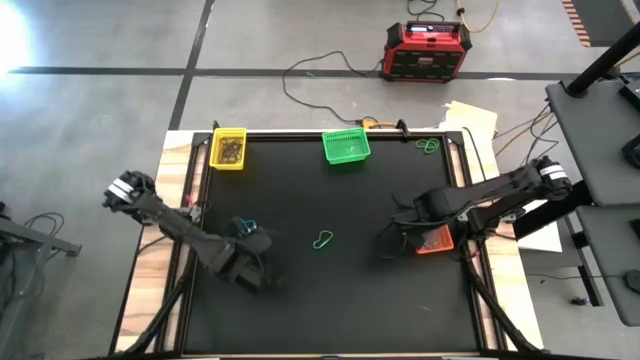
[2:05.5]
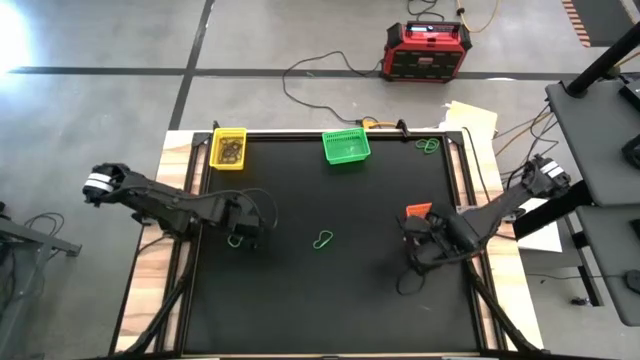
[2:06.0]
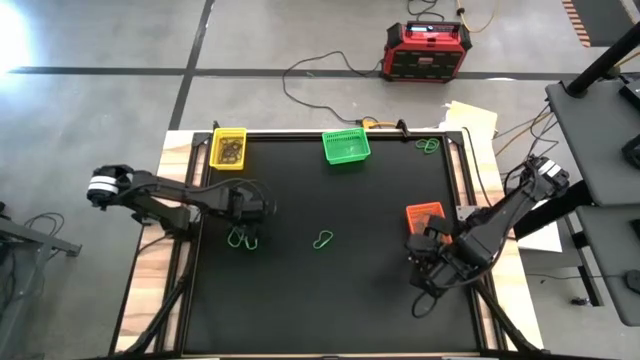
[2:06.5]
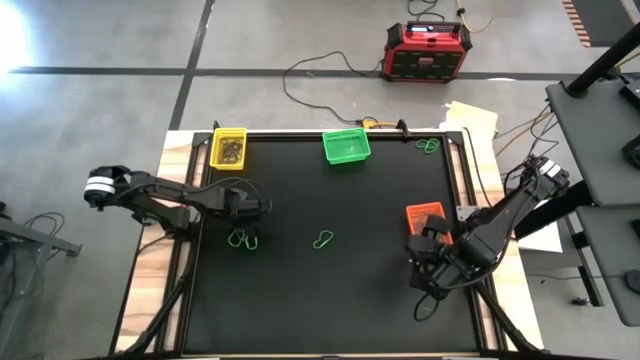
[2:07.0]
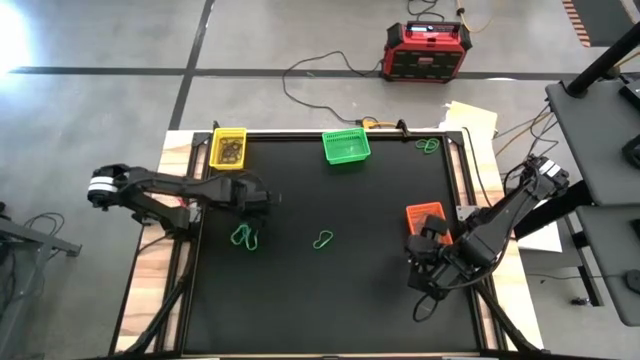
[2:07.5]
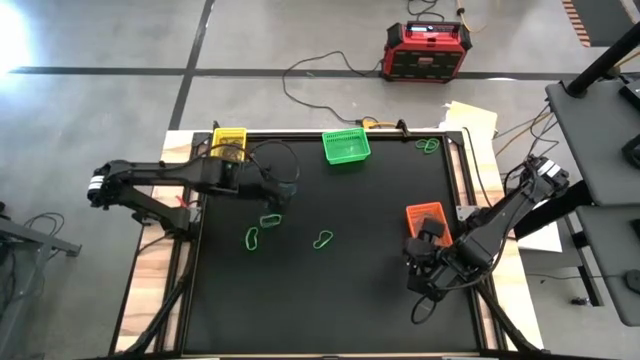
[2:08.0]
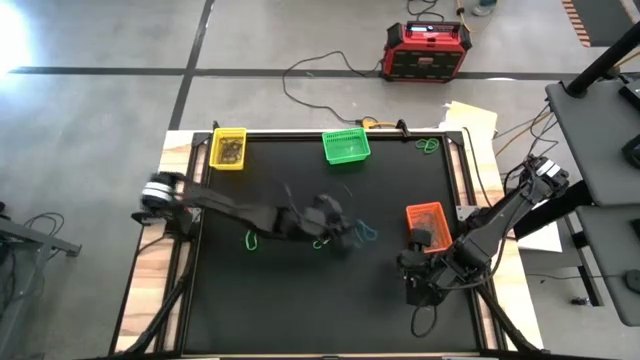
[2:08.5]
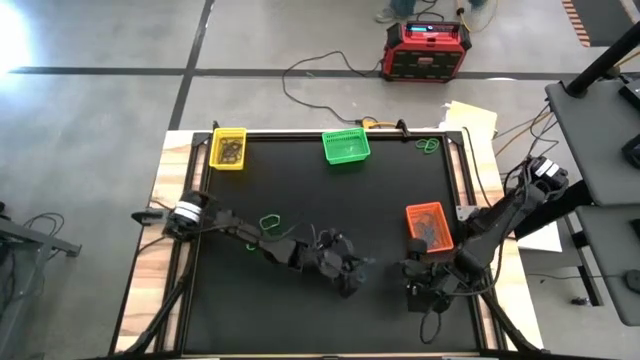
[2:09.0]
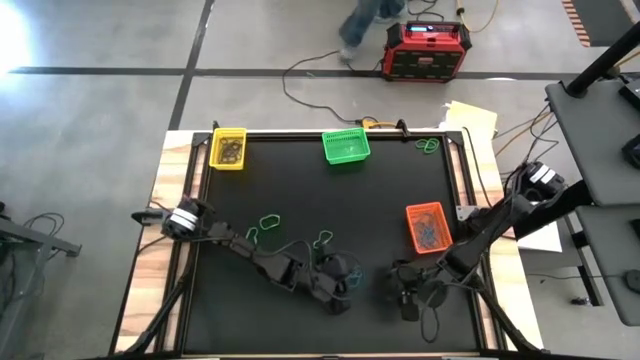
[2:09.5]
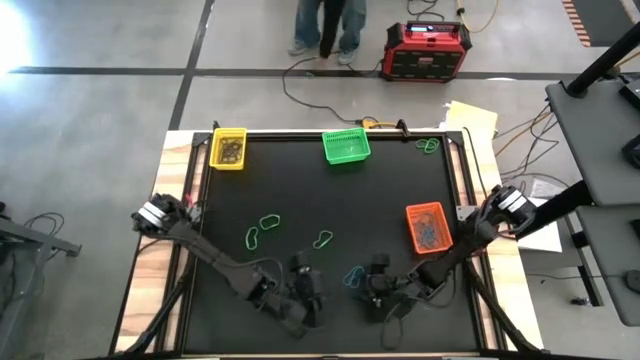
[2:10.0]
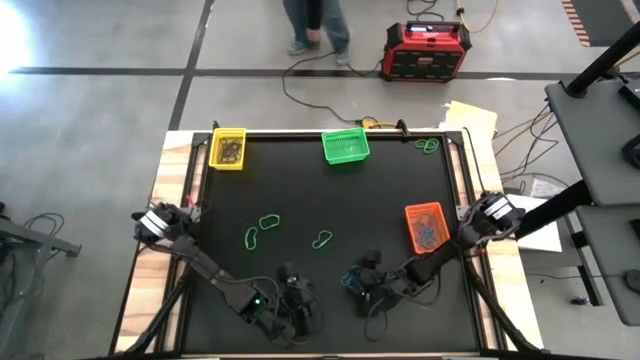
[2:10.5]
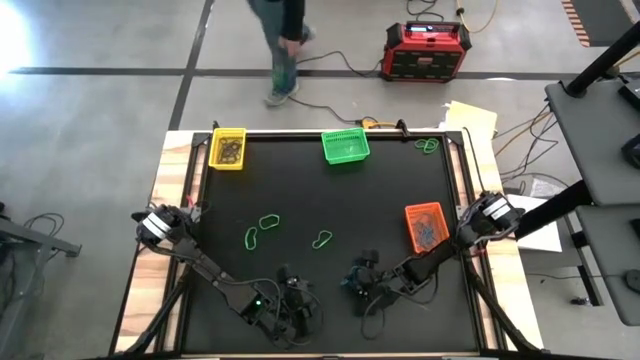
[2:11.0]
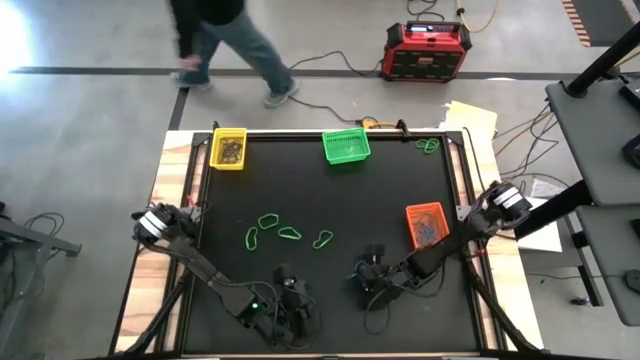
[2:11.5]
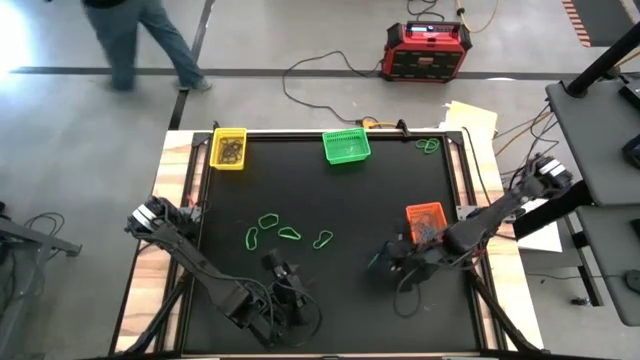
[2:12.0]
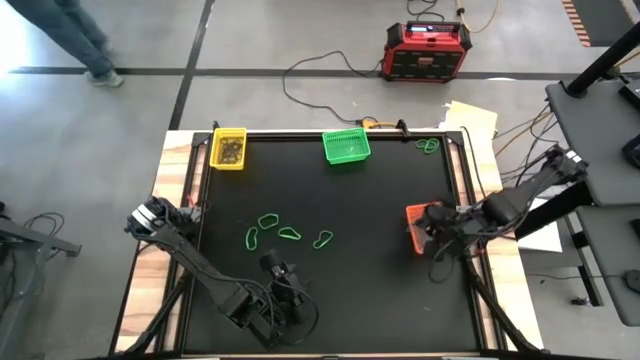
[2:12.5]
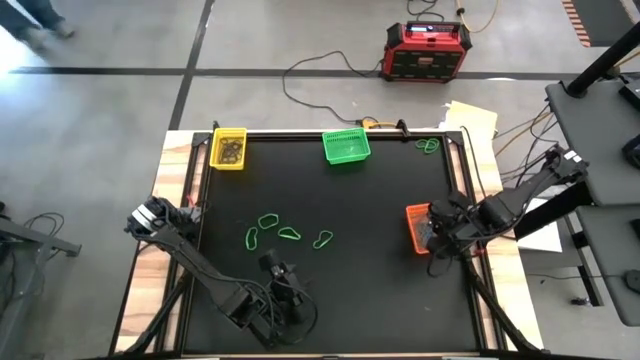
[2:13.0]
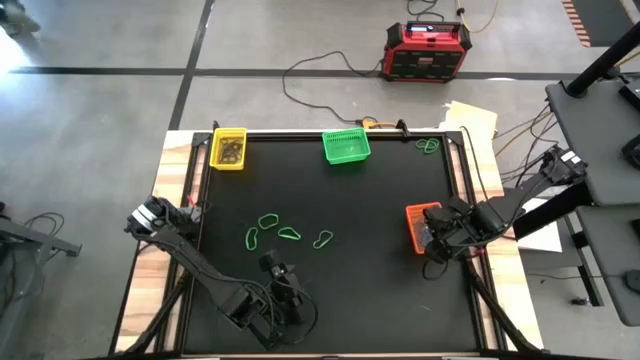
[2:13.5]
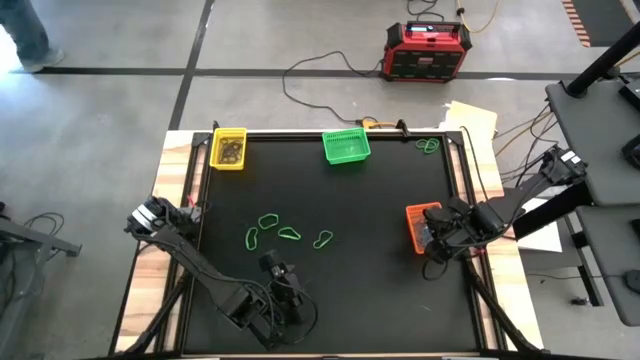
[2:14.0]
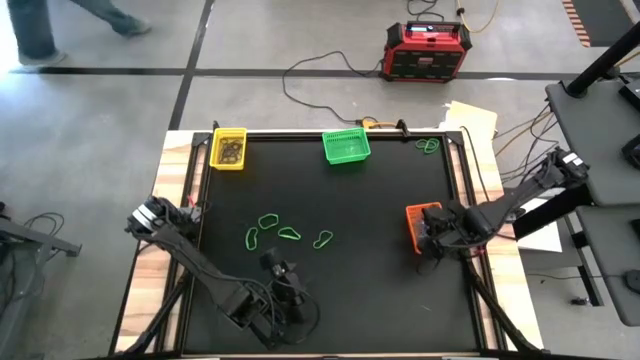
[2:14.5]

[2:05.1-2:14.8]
Task: Sort rubber bands into baskets
Put the blue rubber band into the orange bin

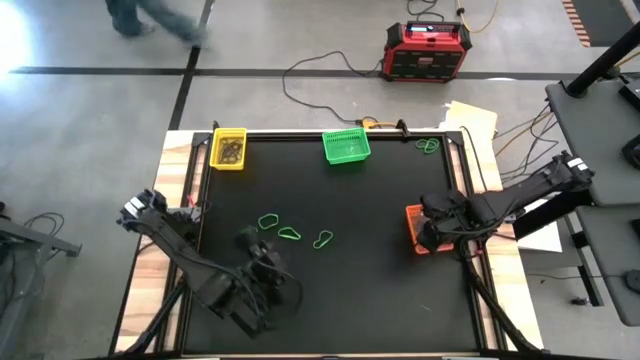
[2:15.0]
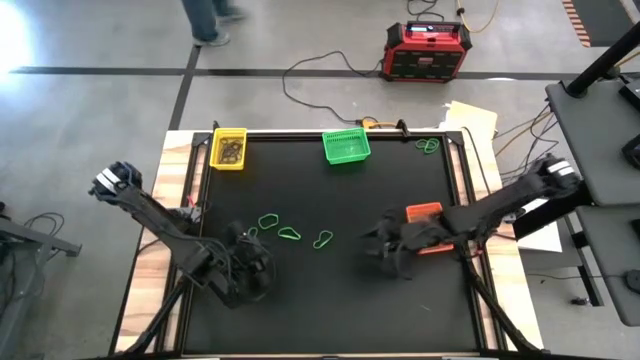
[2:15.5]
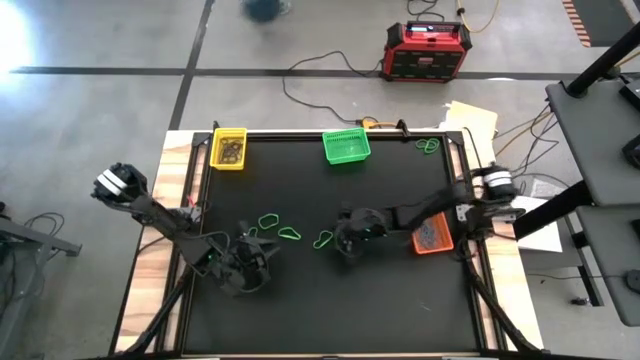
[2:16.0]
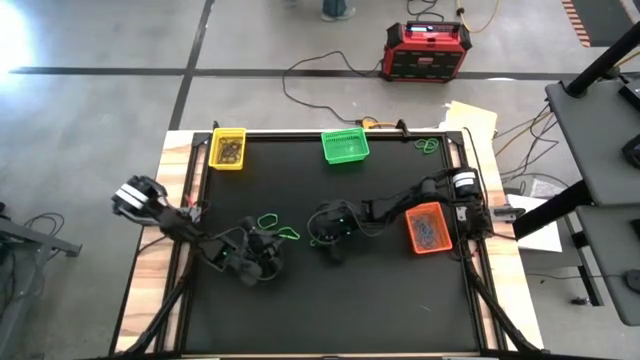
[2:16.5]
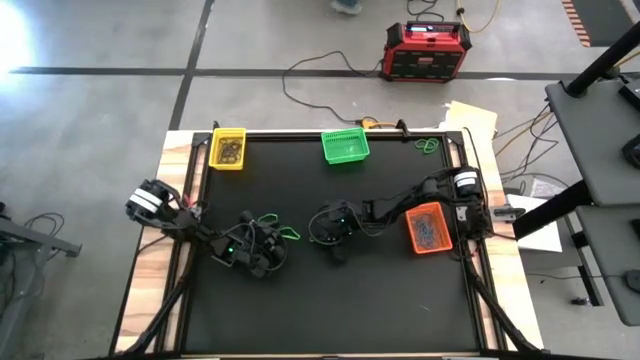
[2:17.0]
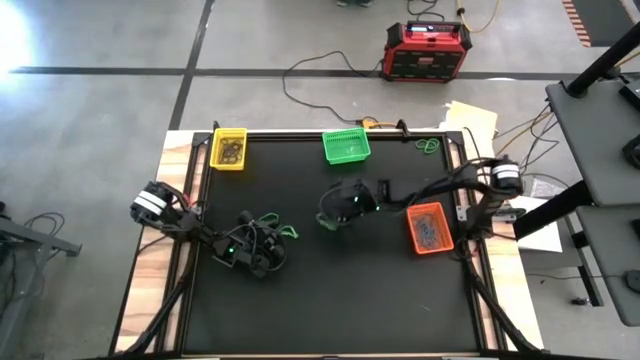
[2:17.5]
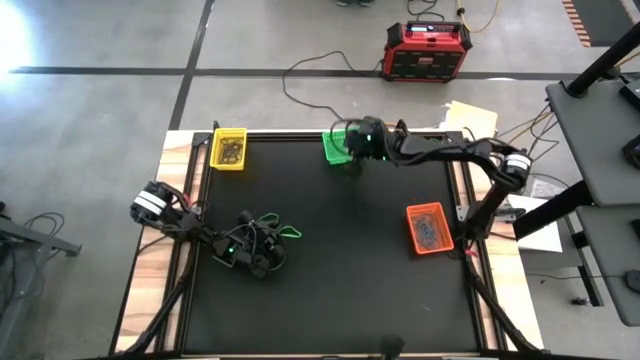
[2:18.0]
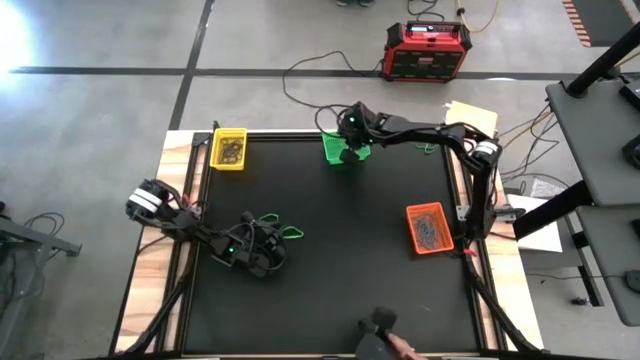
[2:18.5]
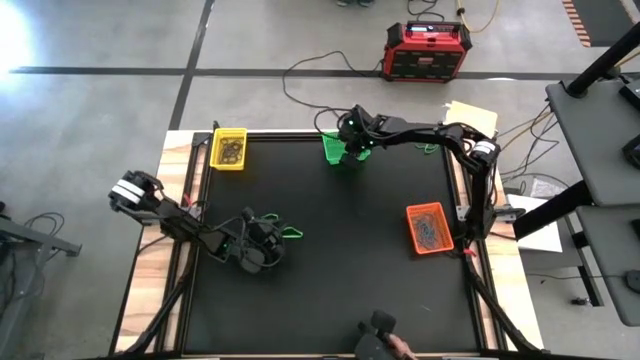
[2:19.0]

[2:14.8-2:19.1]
Put the green rubber band into the green bin

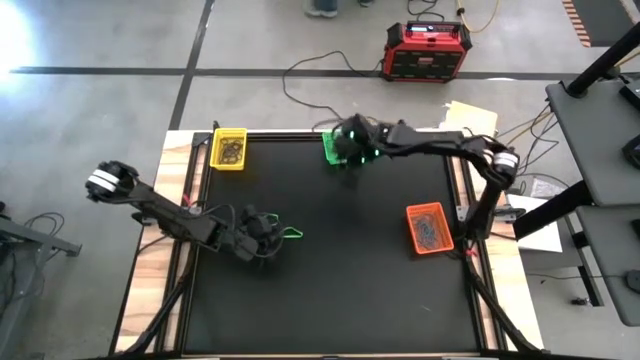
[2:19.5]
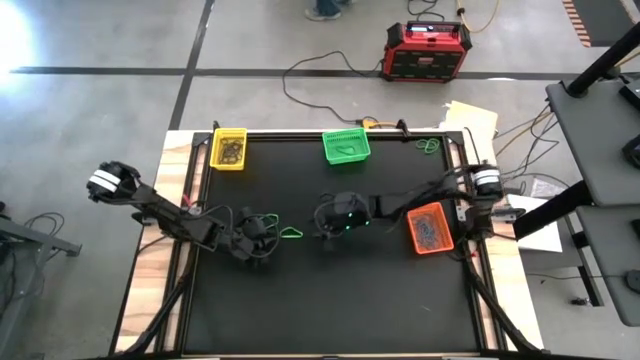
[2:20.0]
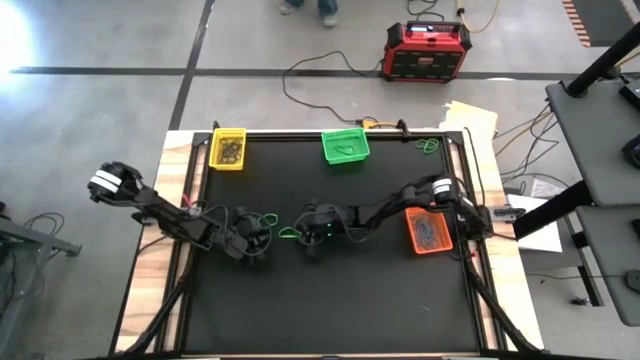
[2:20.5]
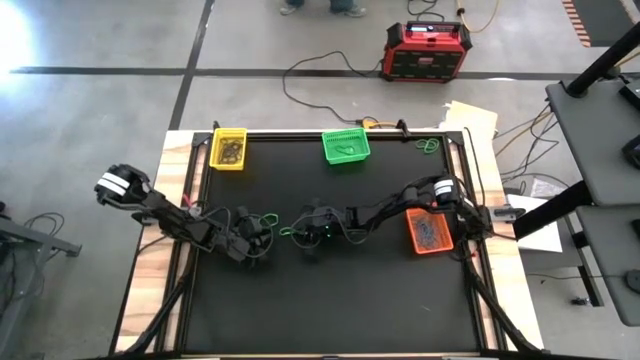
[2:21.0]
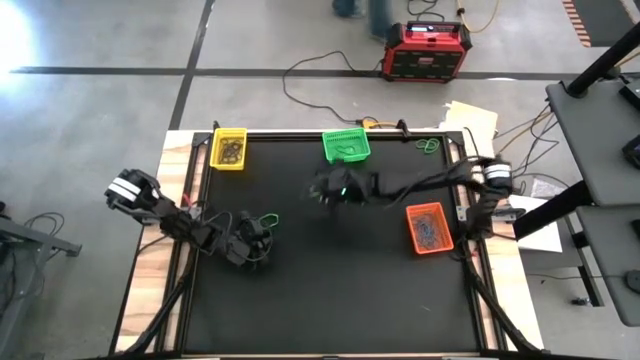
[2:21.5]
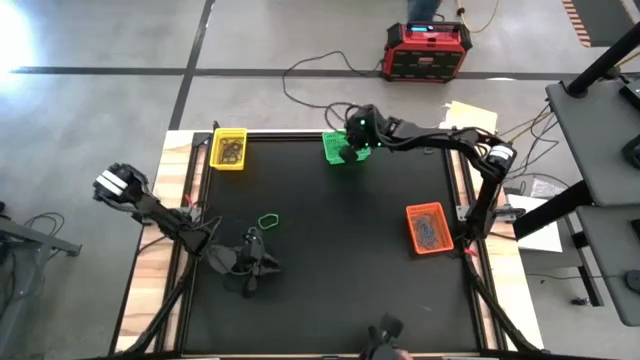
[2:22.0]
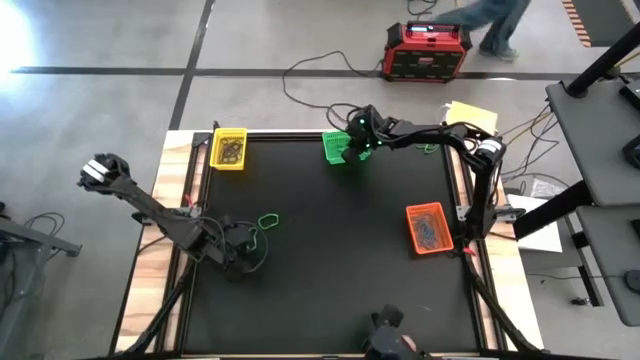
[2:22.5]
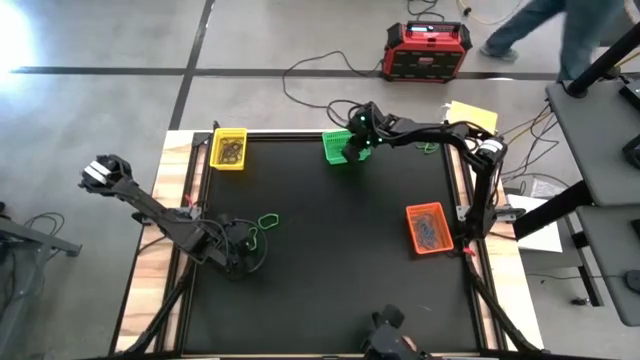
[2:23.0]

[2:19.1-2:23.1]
Put the green rubber band into the green bin

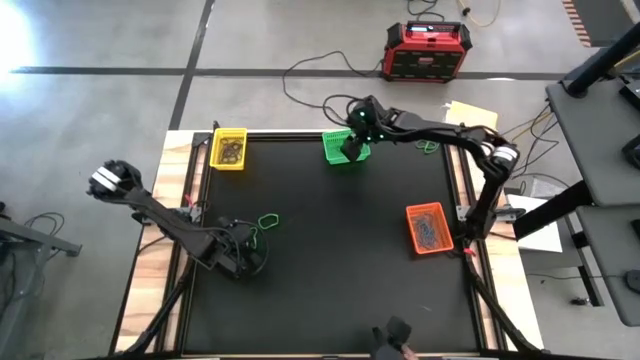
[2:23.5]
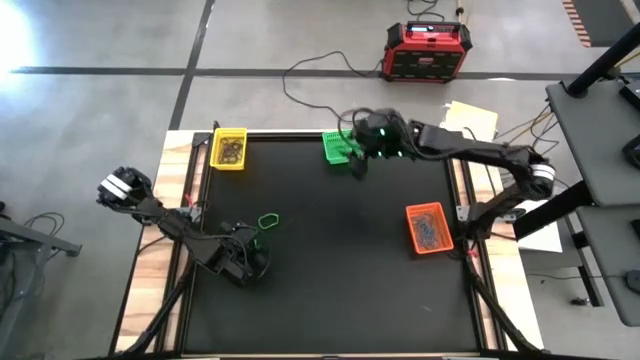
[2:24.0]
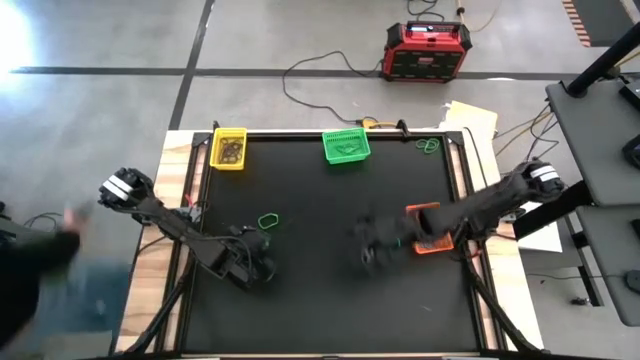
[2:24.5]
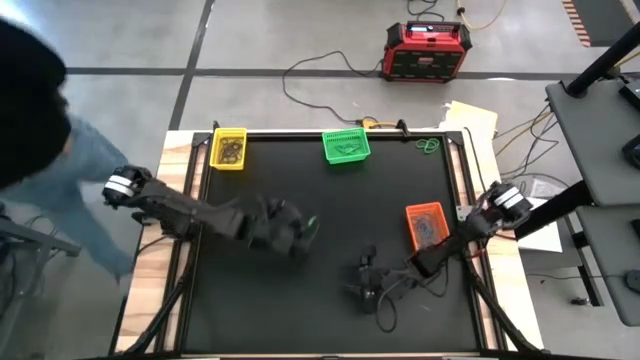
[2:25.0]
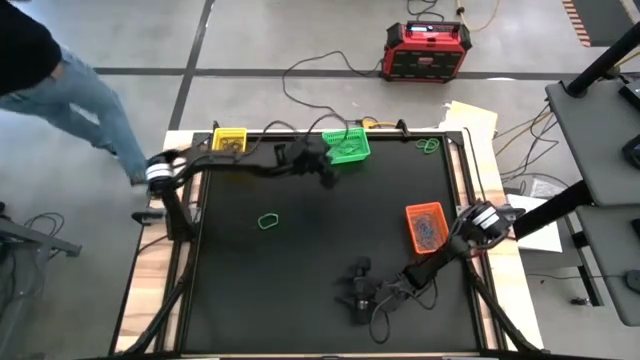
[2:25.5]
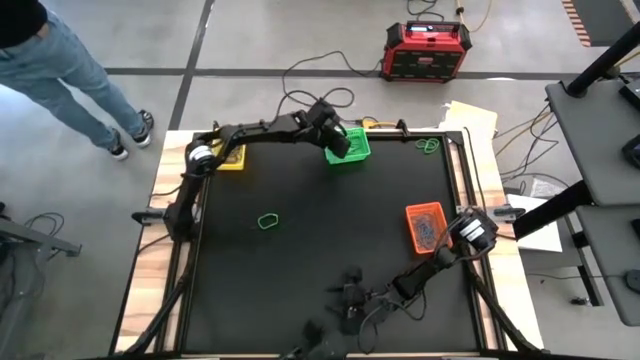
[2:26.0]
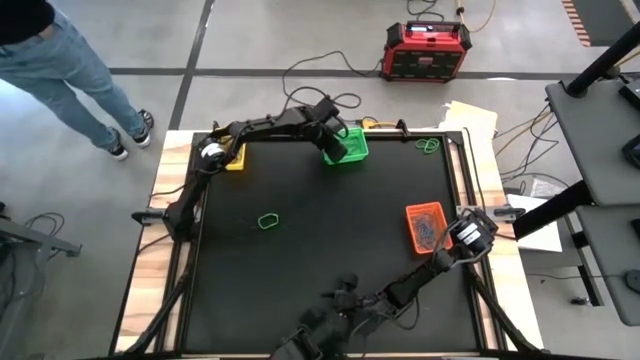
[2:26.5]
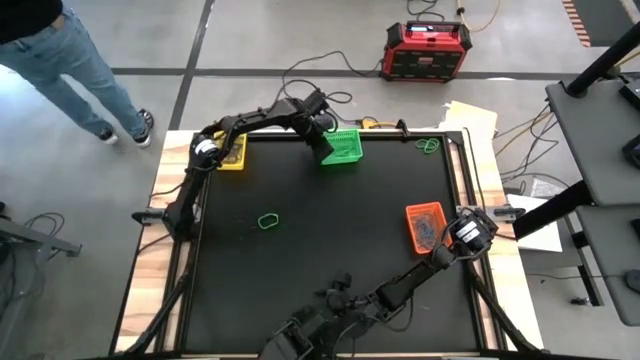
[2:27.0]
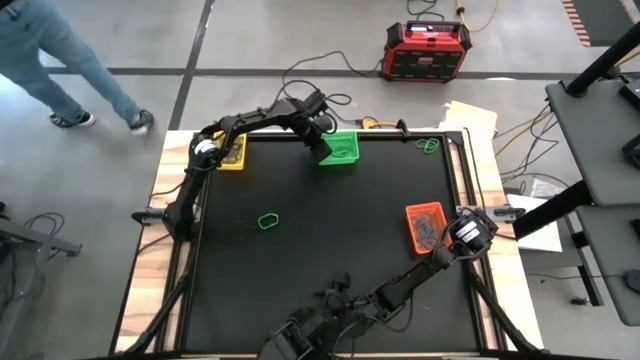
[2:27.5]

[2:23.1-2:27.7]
Put the green rubber band into the green bin
